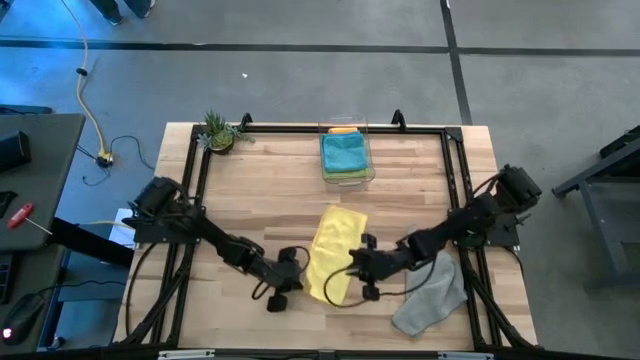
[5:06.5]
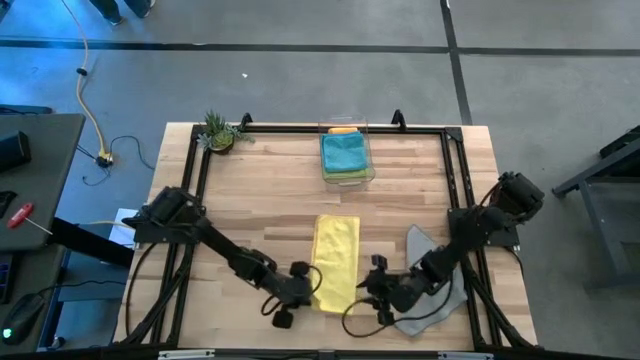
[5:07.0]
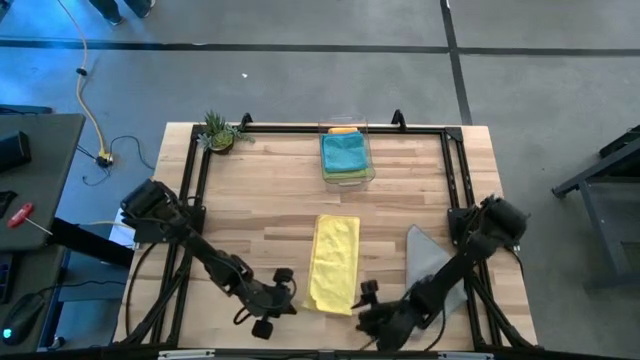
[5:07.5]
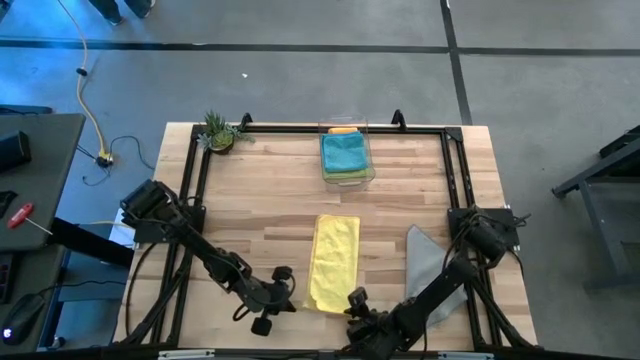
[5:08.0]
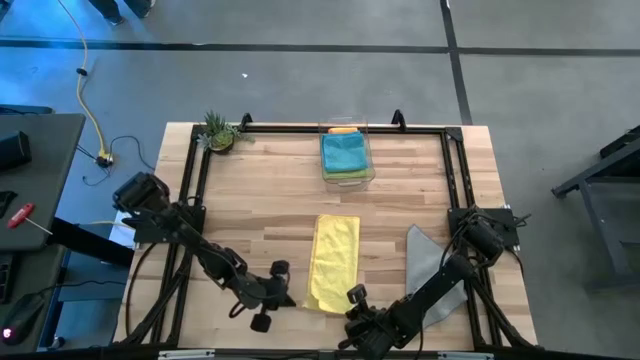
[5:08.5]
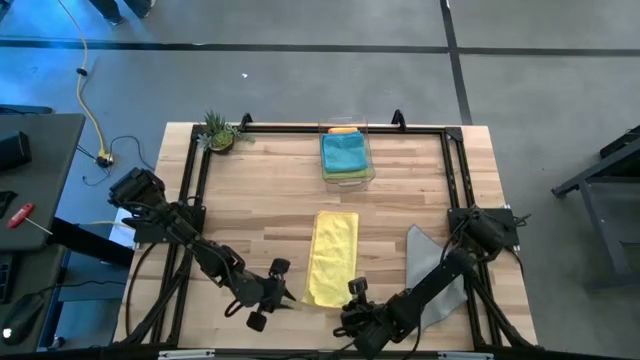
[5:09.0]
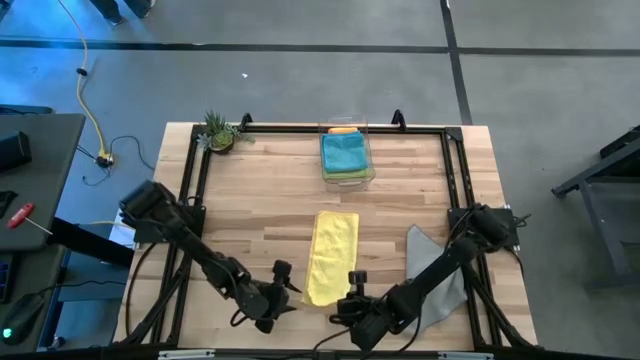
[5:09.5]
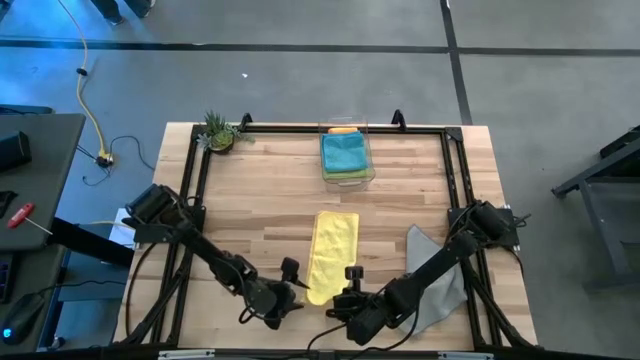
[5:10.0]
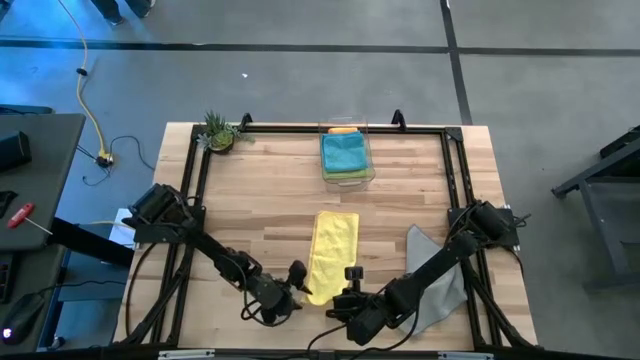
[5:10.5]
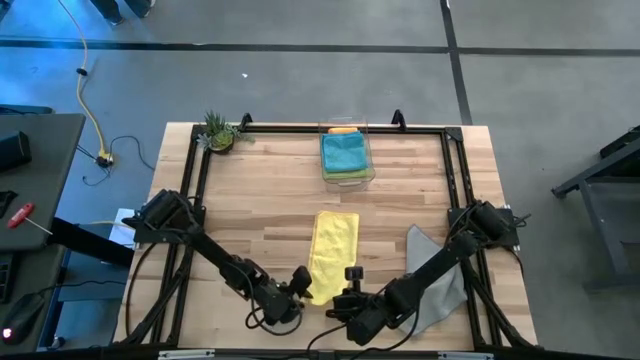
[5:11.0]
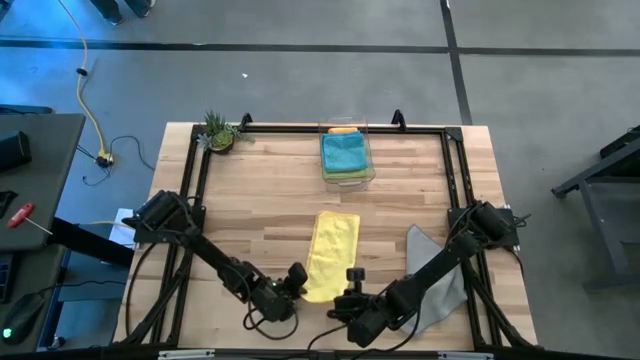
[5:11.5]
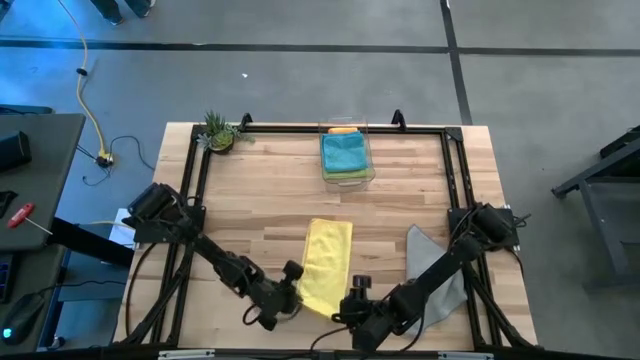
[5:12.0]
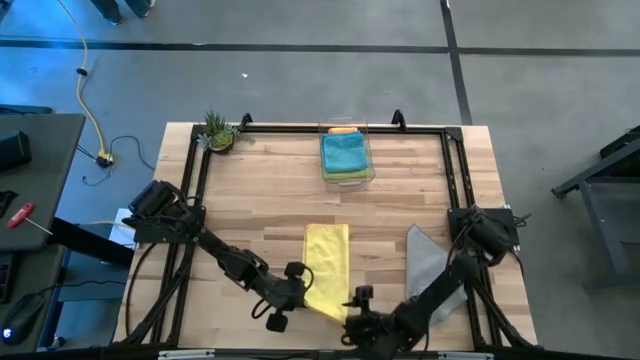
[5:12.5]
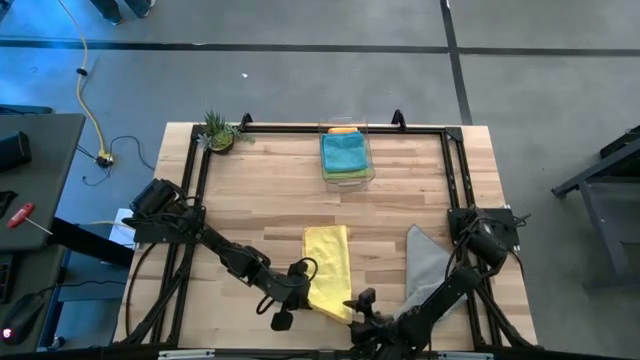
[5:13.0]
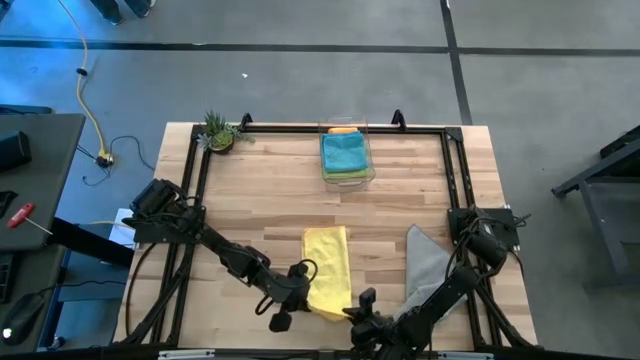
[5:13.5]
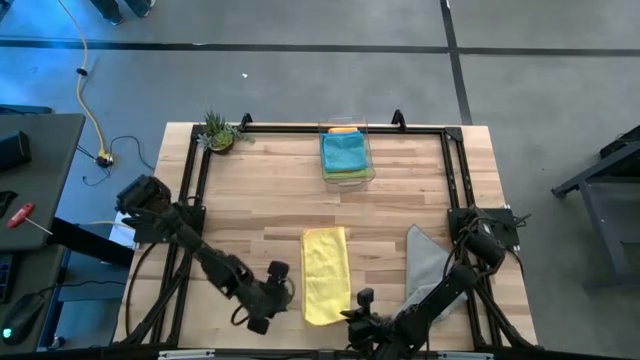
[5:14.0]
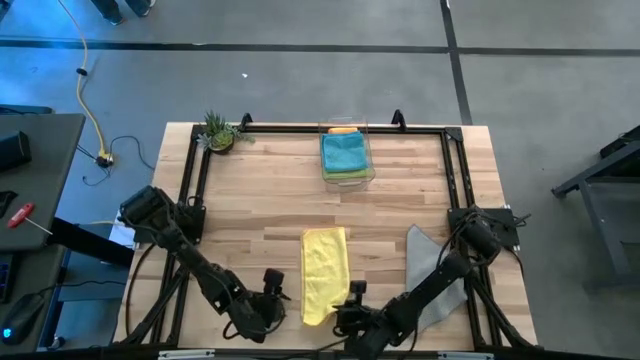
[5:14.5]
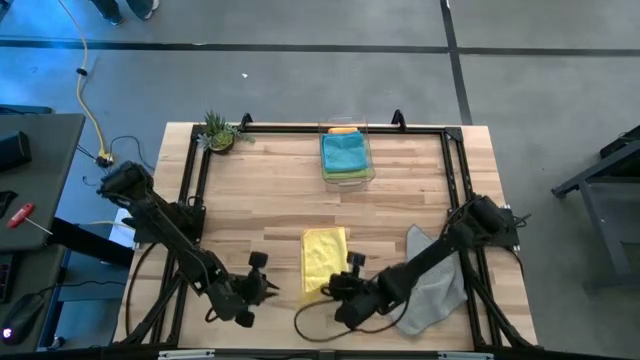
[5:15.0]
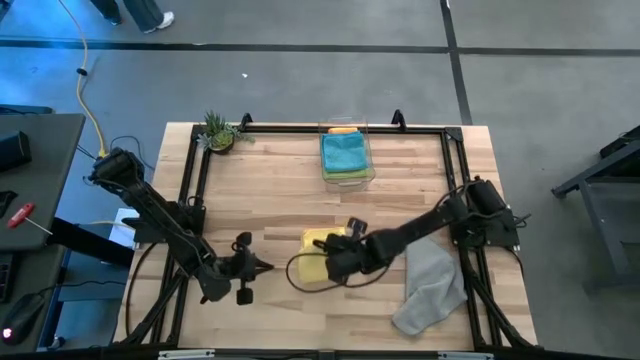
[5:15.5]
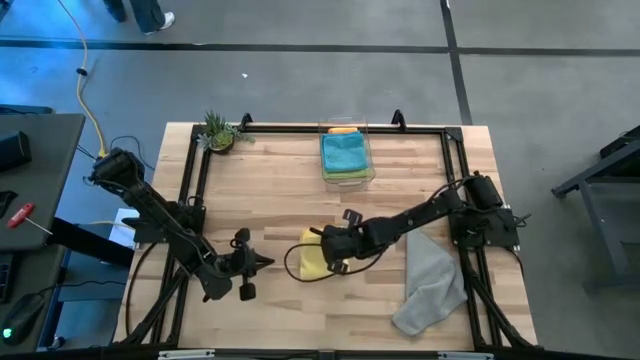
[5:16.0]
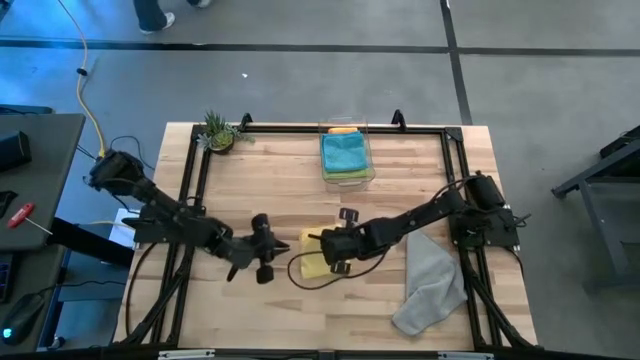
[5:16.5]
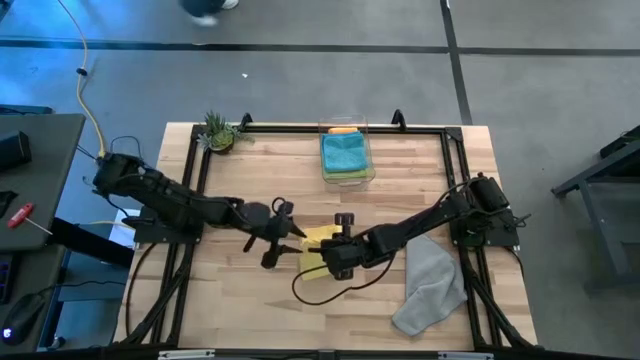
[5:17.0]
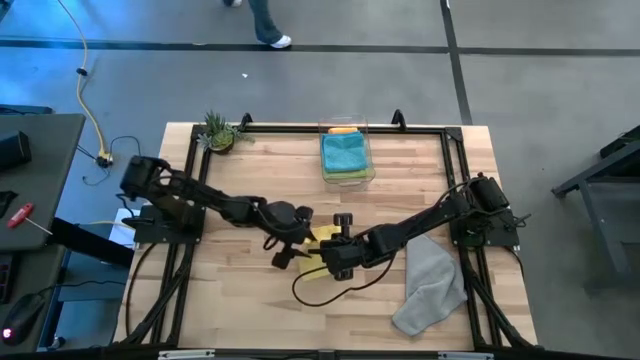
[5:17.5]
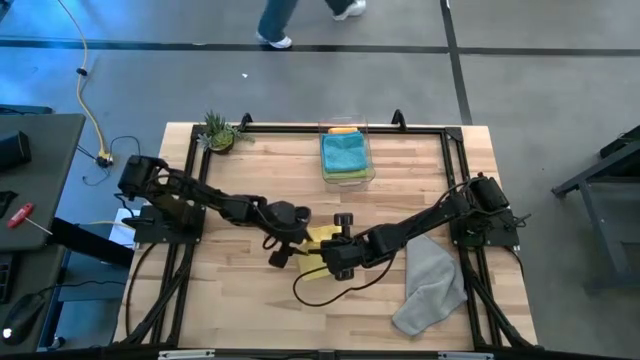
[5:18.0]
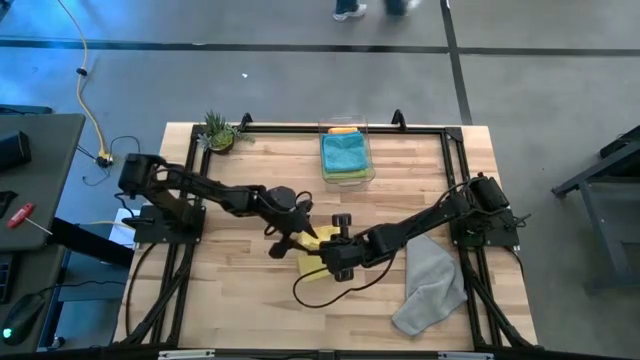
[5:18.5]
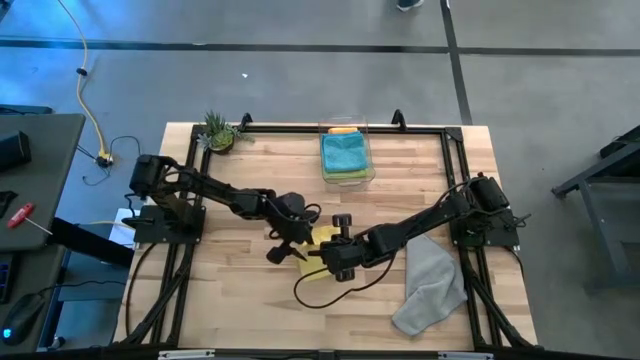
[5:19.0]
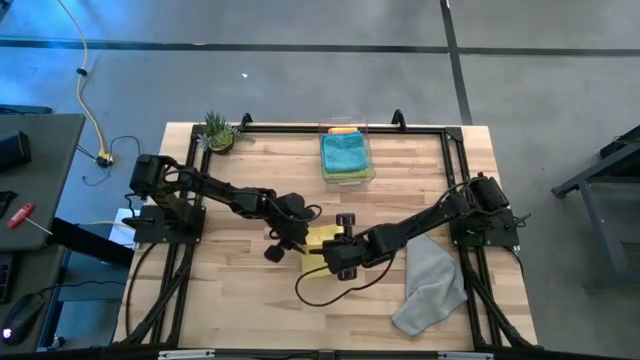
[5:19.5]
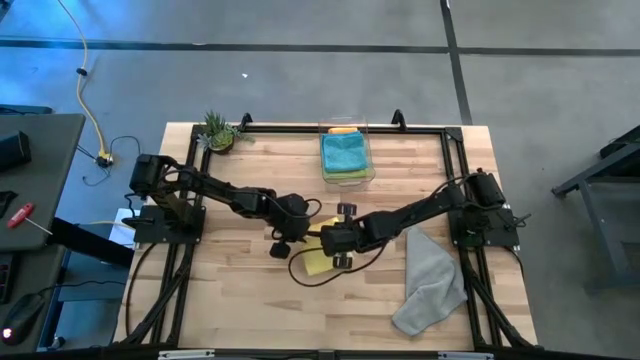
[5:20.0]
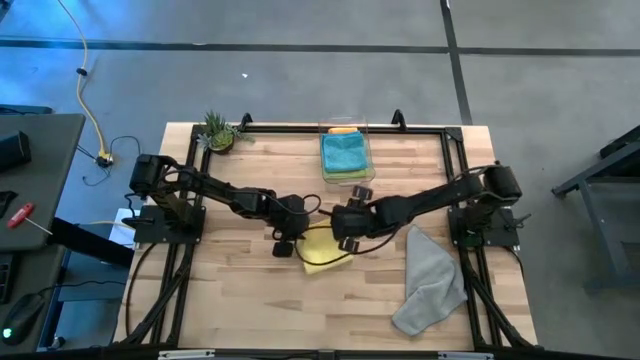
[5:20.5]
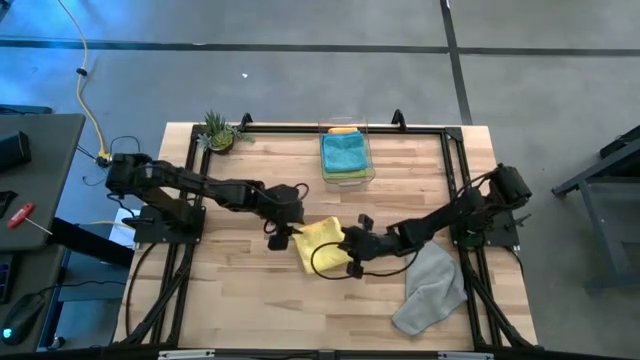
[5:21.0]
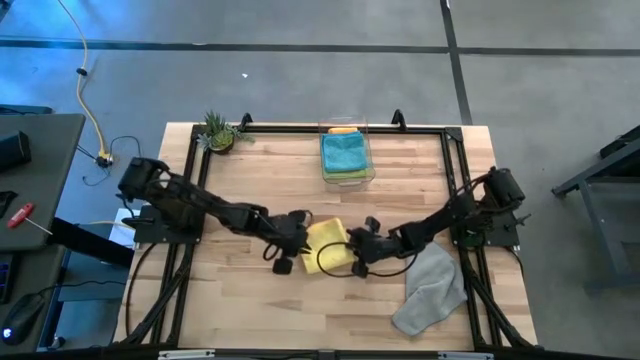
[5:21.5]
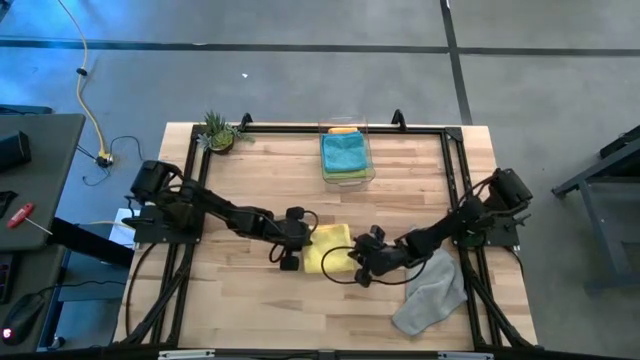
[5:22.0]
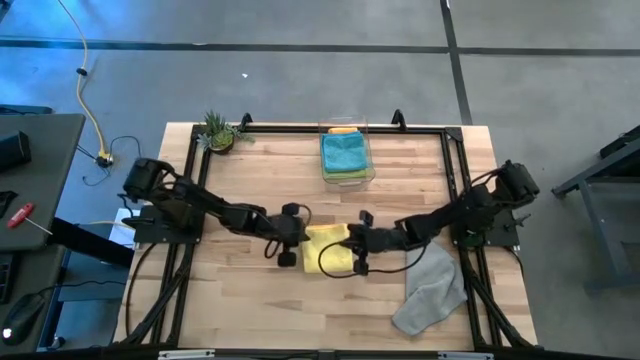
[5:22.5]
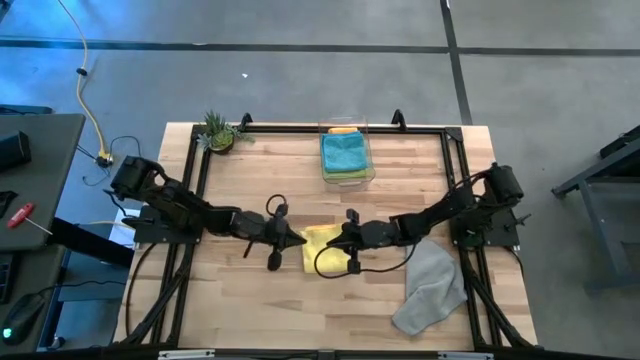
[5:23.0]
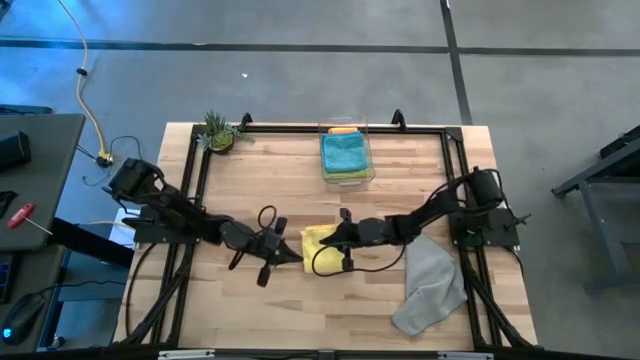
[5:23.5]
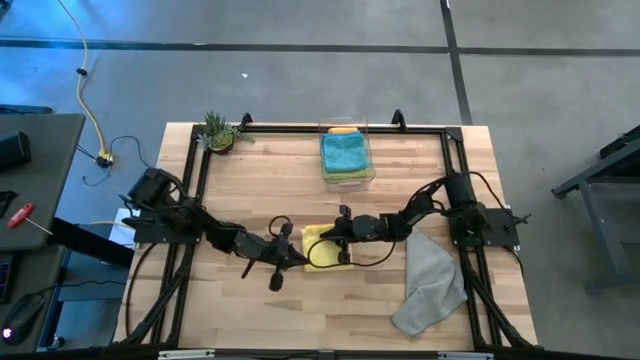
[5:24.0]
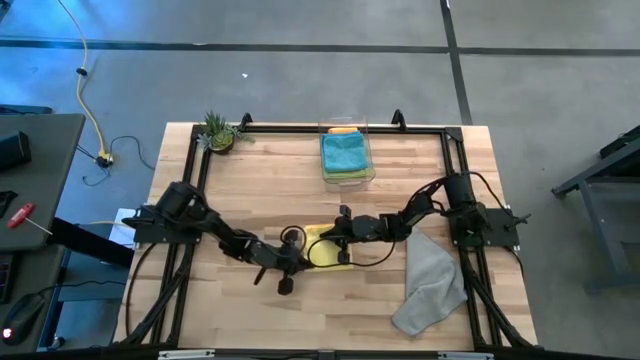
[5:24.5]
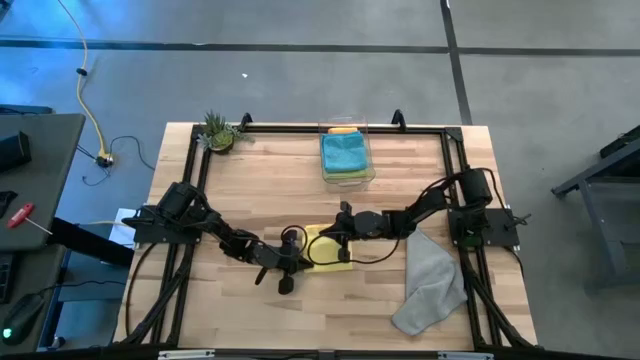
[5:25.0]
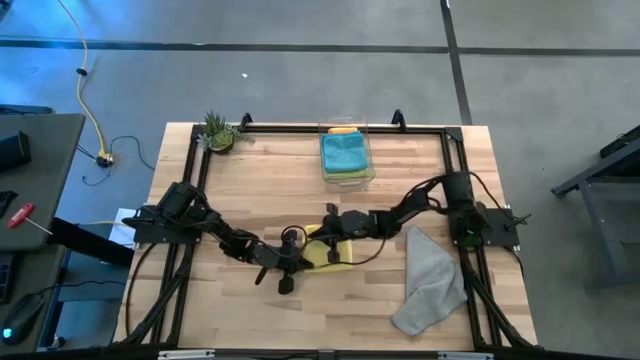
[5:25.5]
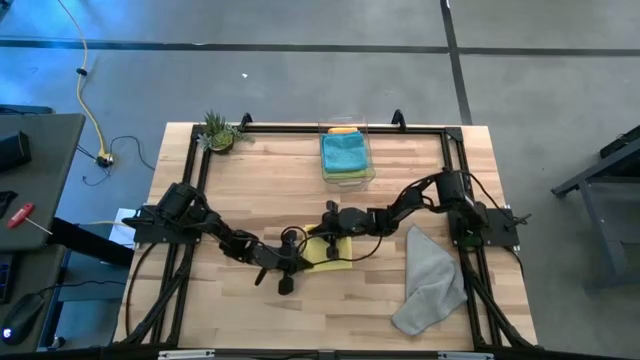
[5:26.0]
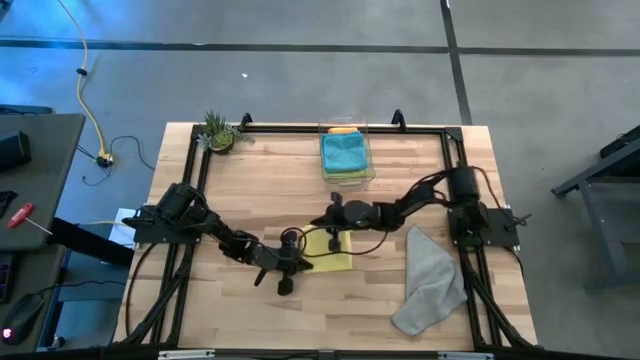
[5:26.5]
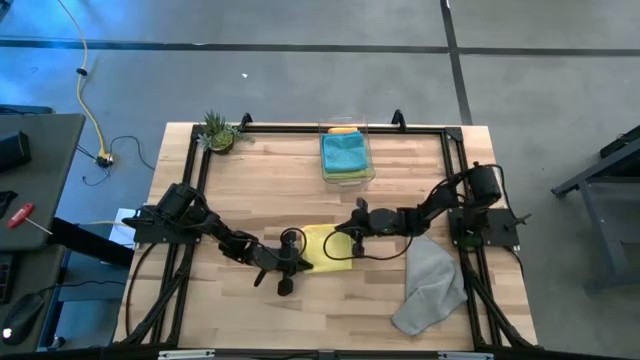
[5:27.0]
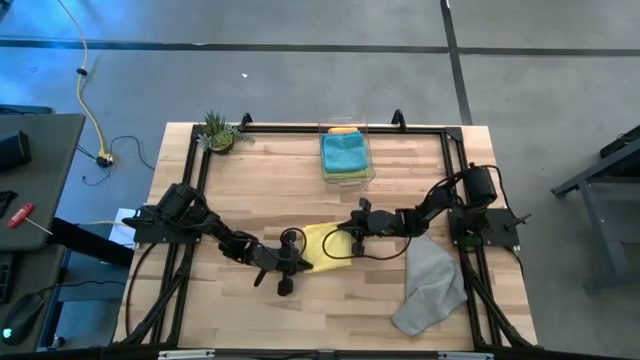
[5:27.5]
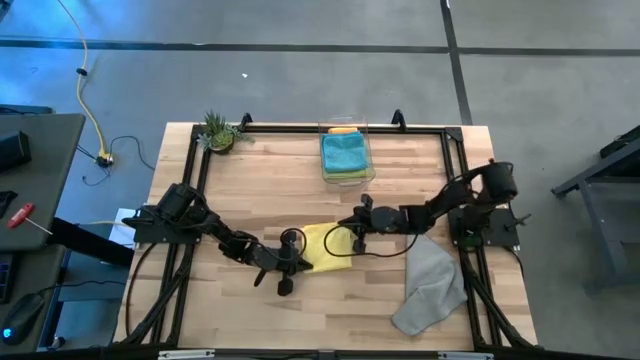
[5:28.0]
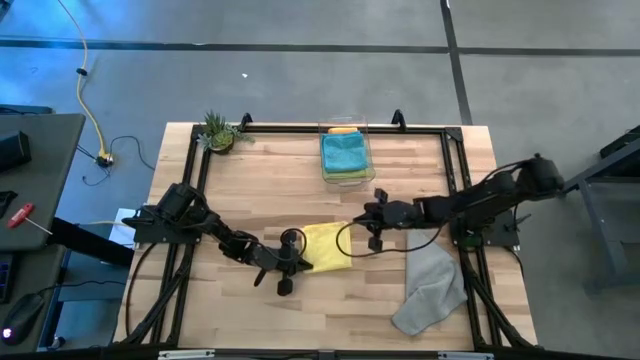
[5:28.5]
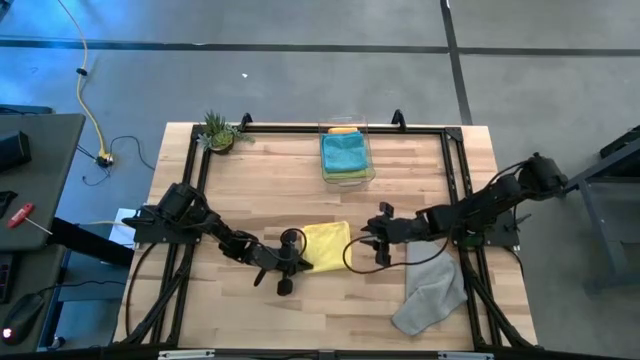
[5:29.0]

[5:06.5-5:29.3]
Task: Fold microfiber towels
Fold the yellow microfiber cloth
